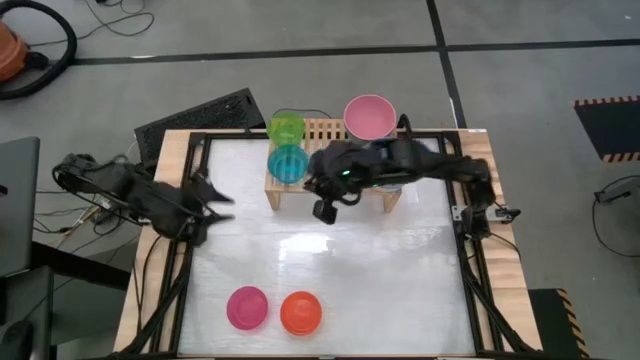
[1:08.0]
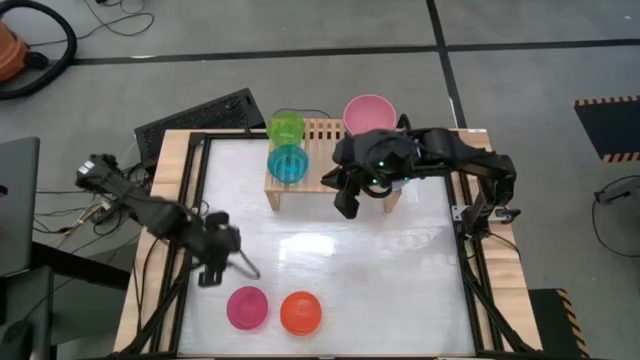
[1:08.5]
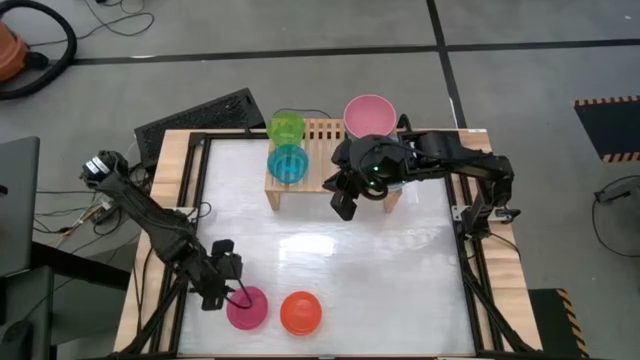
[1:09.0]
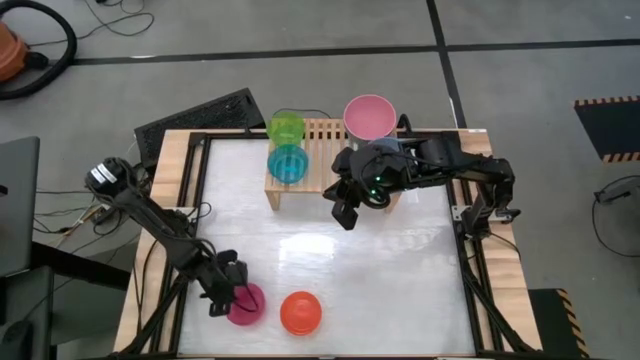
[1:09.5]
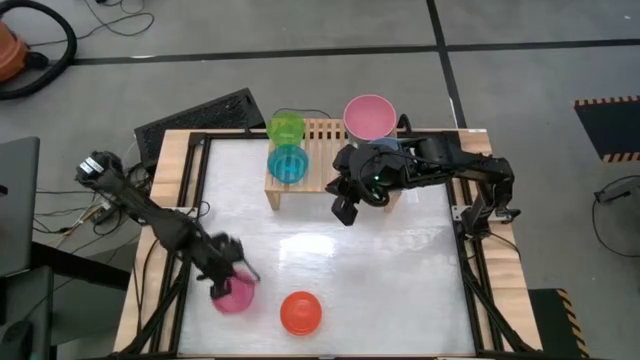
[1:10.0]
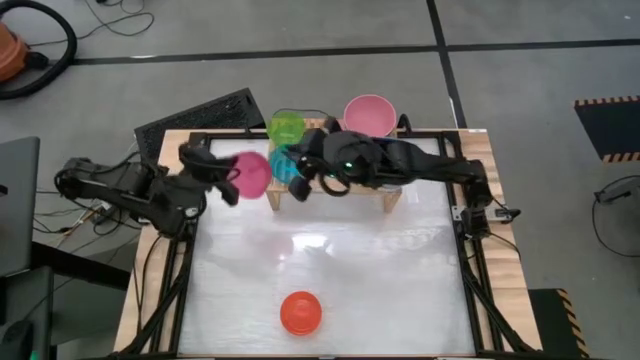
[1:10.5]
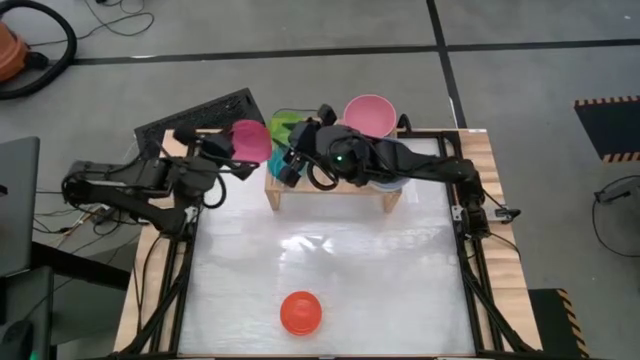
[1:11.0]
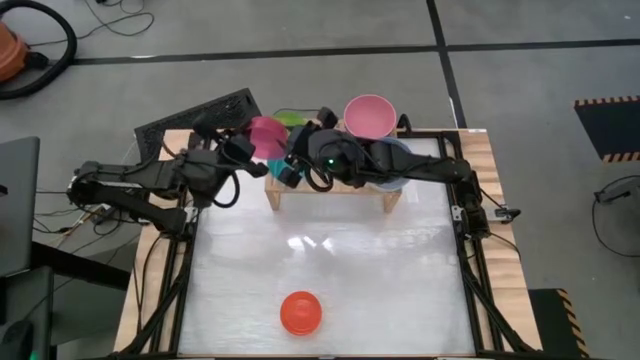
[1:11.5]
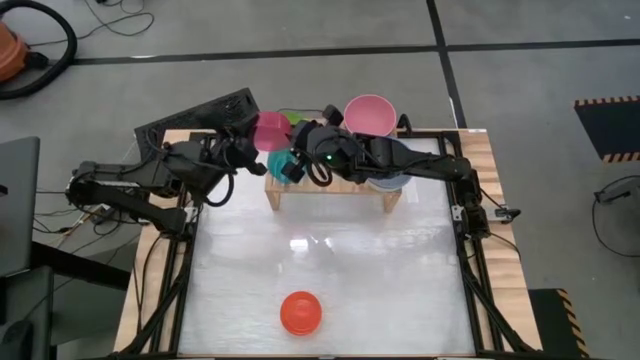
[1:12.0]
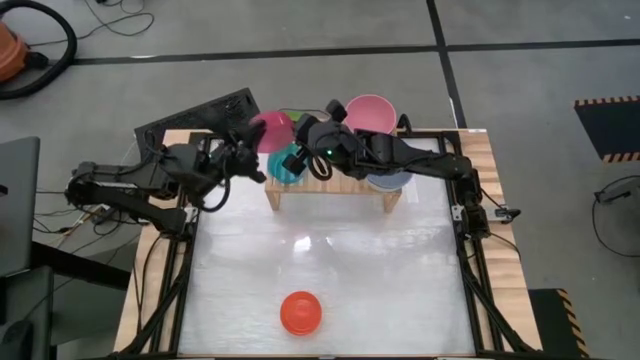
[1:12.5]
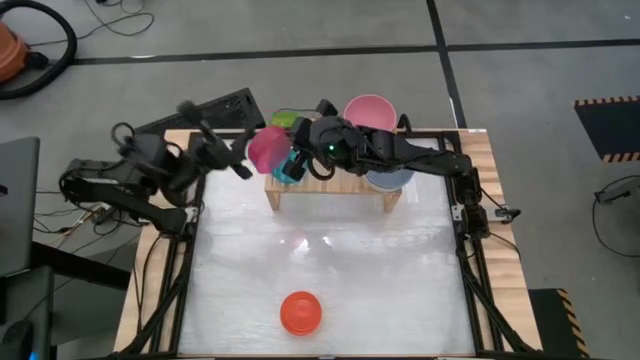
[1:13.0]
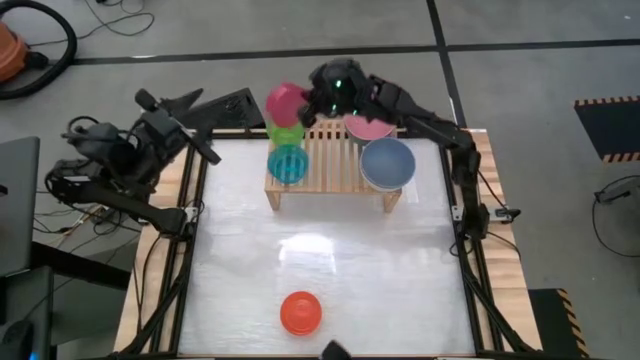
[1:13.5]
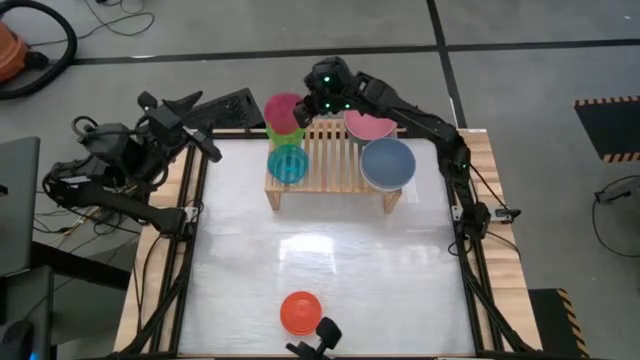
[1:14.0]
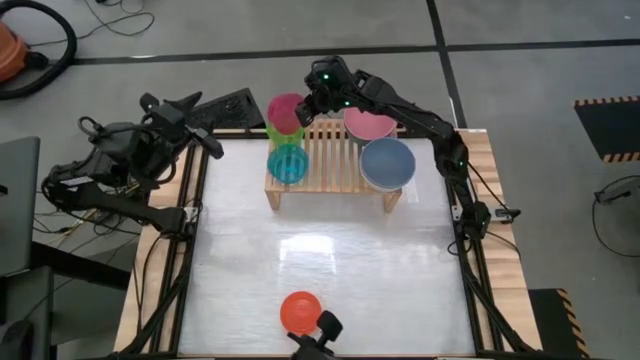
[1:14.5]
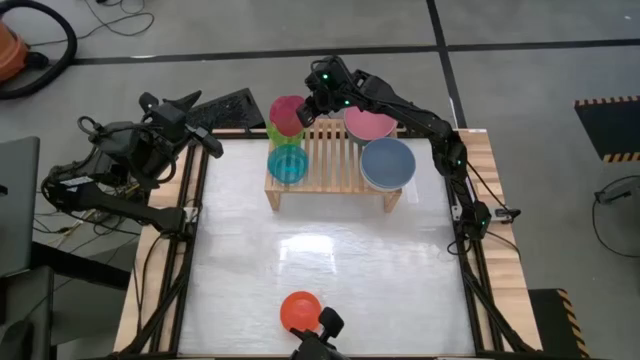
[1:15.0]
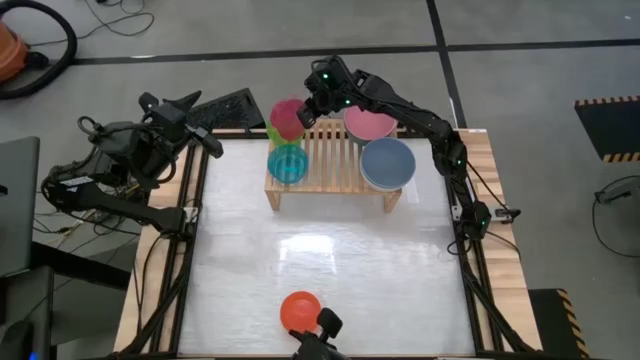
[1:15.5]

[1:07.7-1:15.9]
Task: Place and stack bowls onto a shelf
Stack the small pink bowl on top of the small green bowl on the shelf

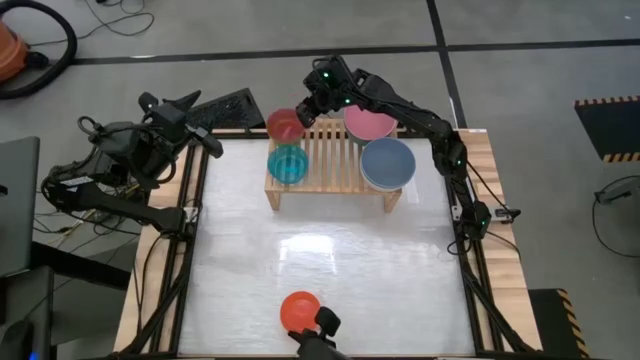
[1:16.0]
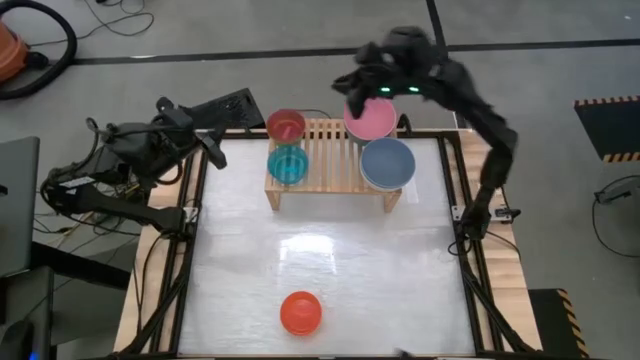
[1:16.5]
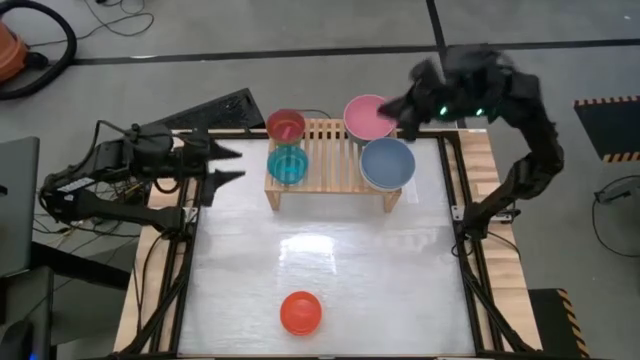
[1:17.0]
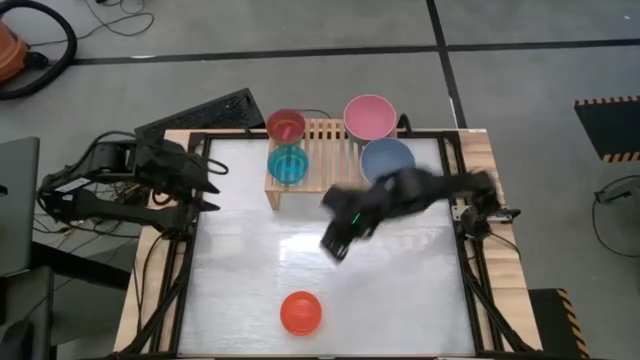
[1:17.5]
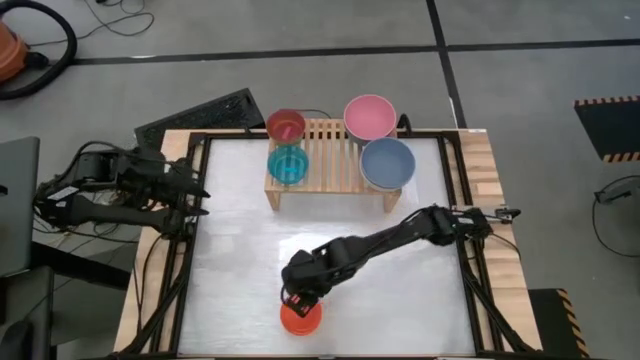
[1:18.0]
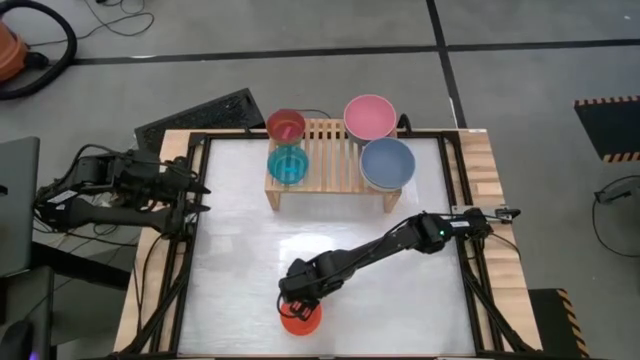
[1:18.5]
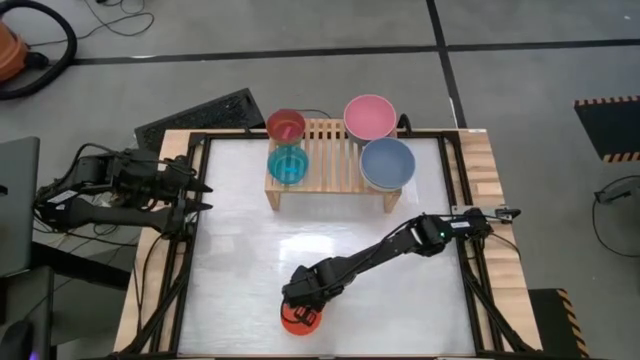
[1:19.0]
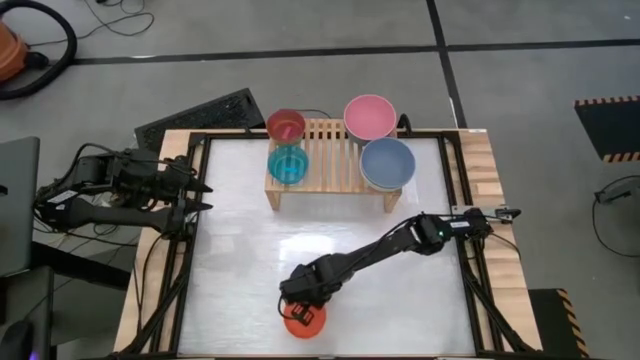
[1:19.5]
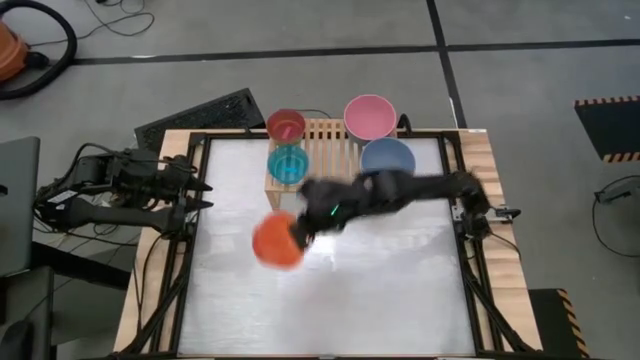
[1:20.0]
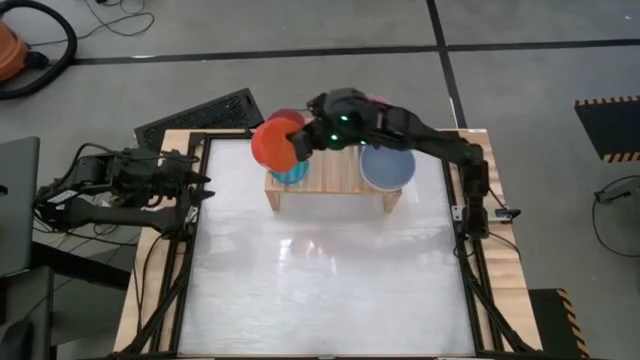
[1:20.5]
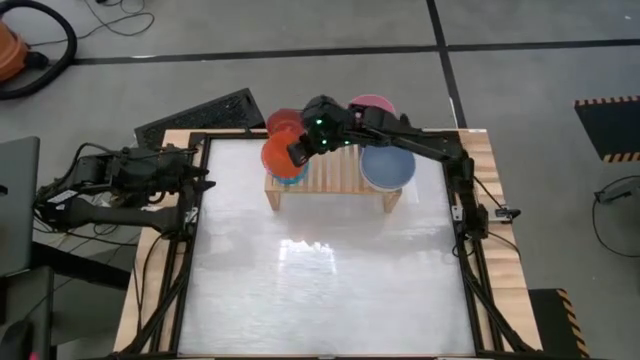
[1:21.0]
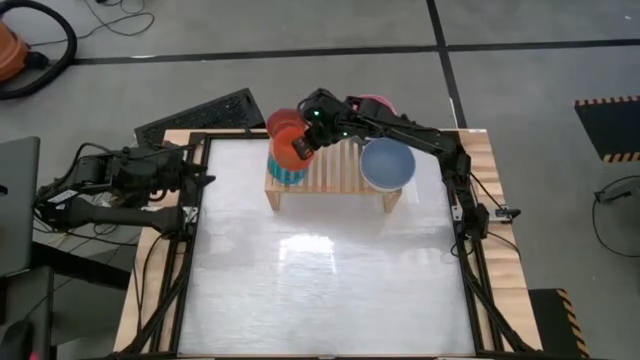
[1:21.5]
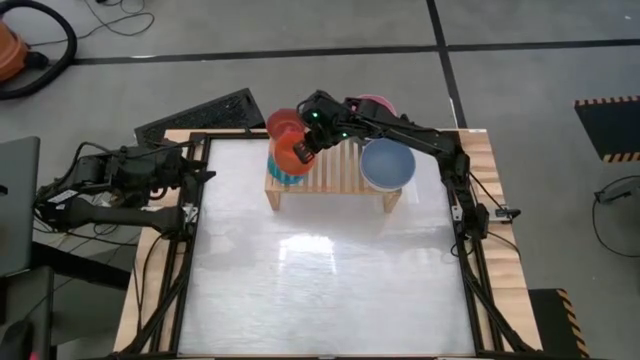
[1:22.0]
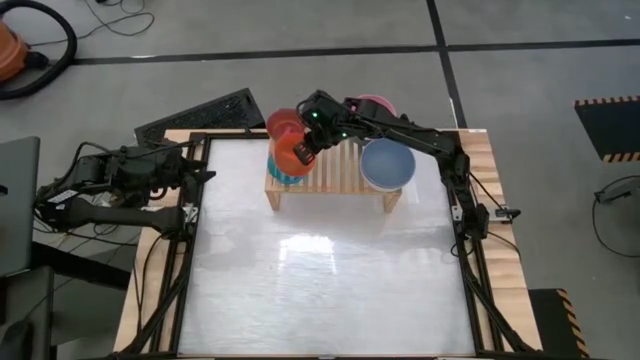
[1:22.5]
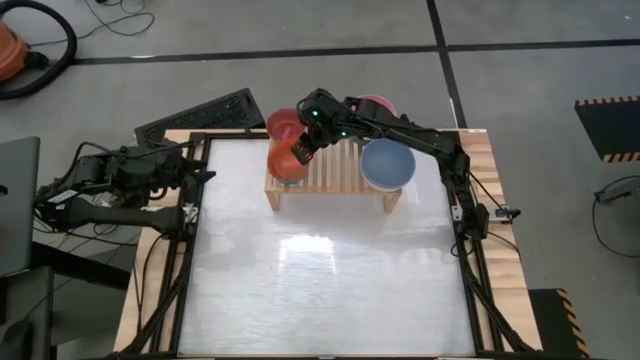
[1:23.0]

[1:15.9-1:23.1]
Stack the small orange bowl on top of the small blue bowl on the shelf

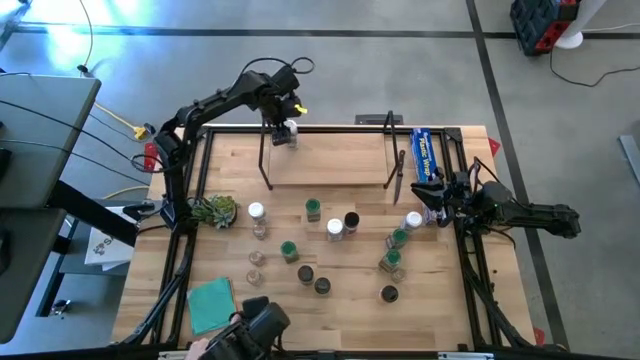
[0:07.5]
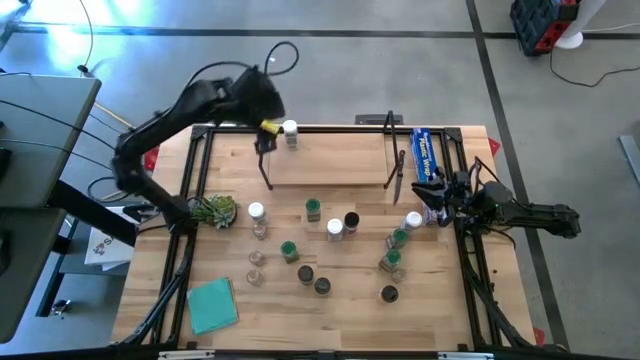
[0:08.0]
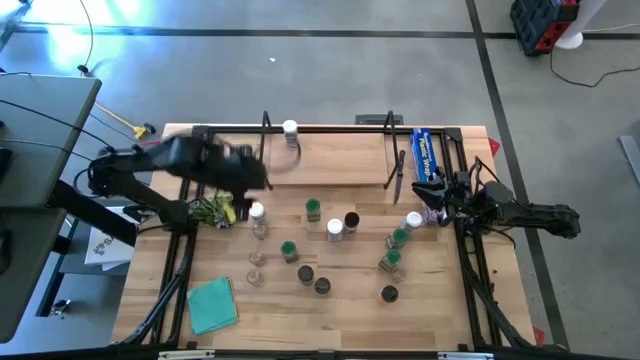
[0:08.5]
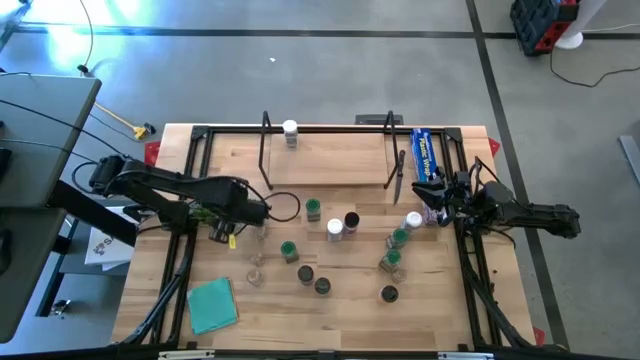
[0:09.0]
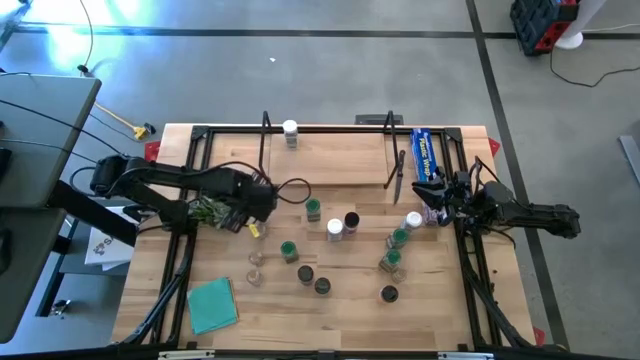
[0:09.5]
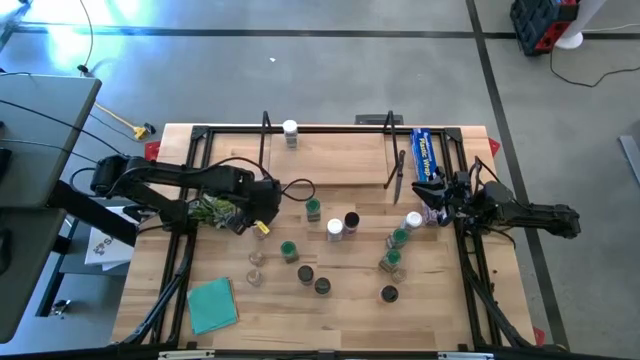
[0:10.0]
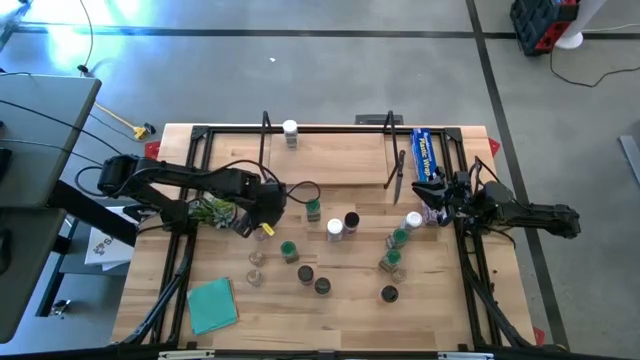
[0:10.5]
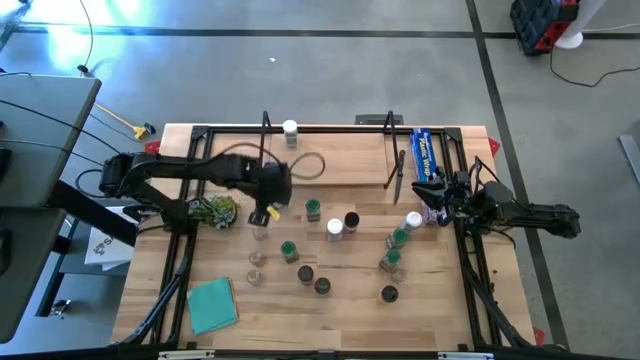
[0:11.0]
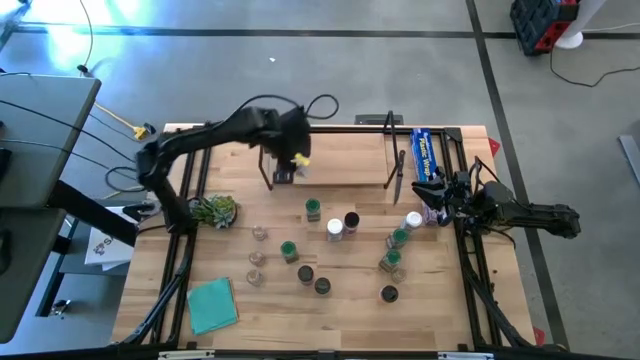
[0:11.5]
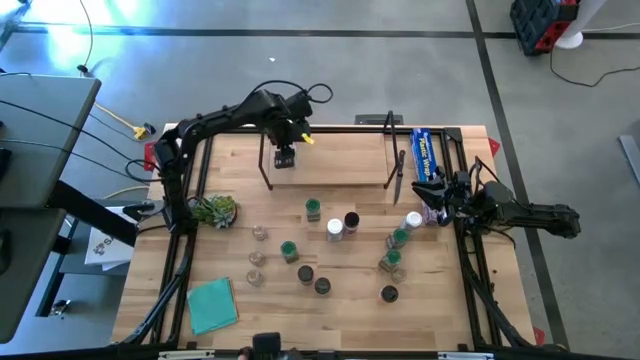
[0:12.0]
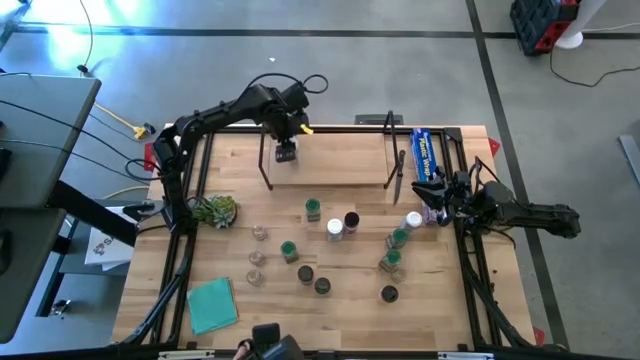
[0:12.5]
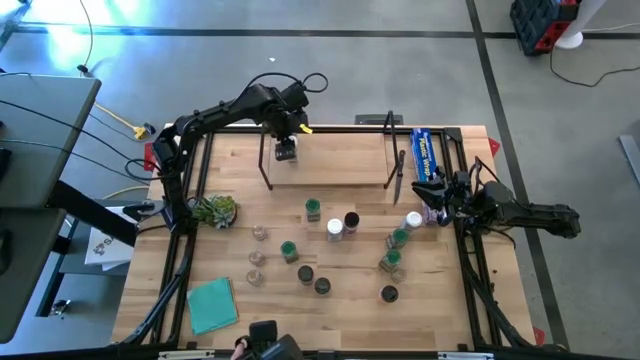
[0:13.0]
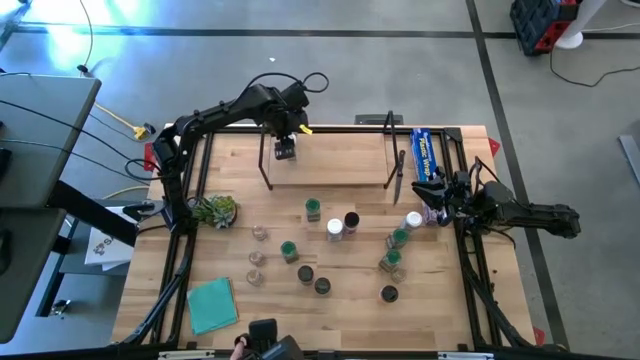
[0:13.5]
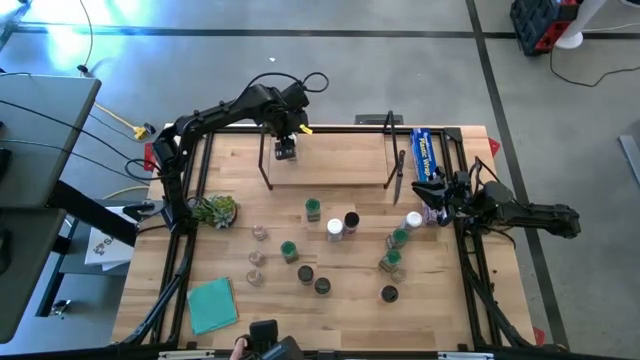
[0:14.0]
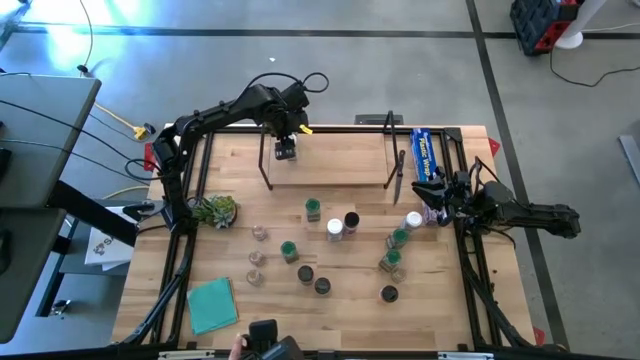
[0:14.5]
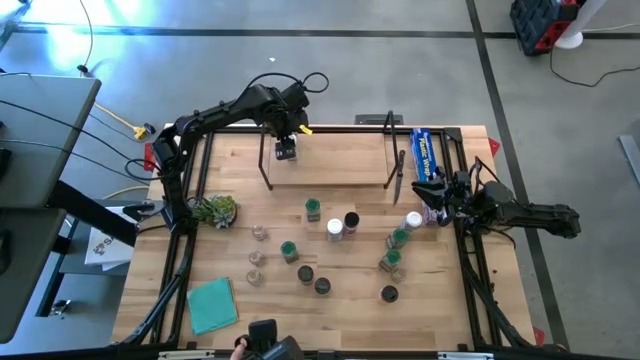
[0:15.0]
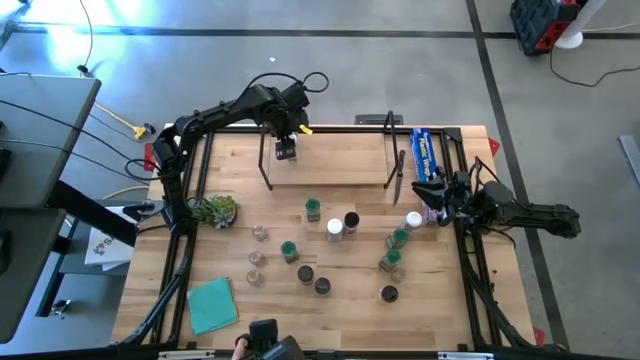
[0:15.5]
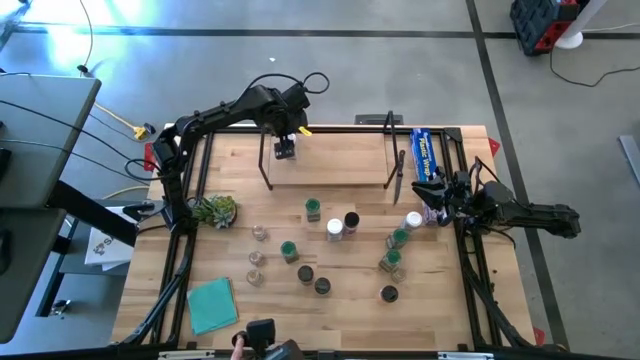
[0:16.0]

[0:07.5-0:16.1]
Task: Shelf spices
Put the white seasoning bottle on the shelf aligned with the other white seasoning bottle
